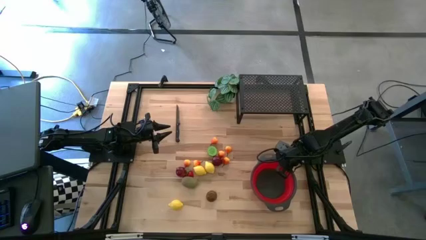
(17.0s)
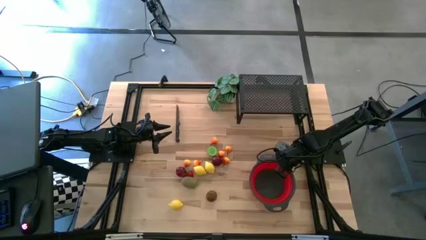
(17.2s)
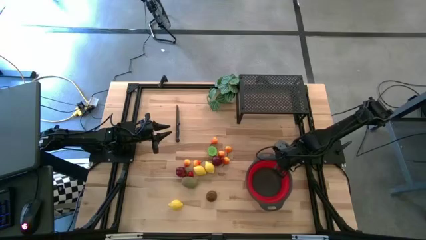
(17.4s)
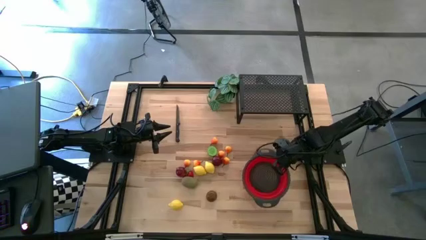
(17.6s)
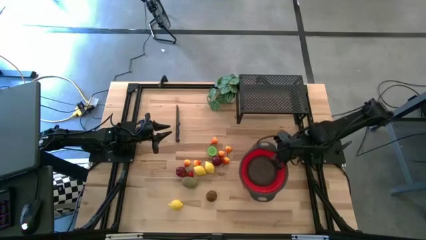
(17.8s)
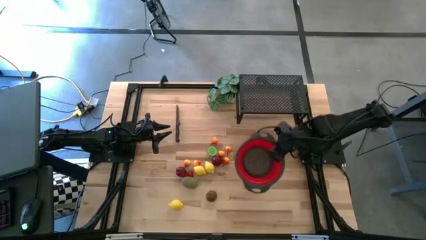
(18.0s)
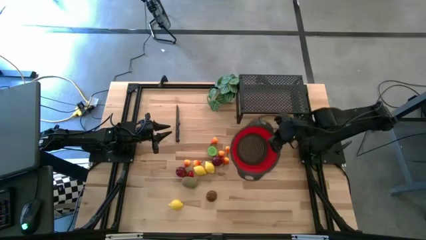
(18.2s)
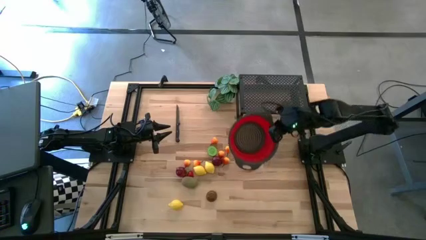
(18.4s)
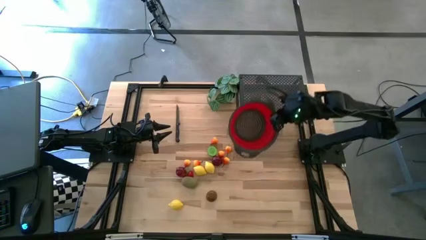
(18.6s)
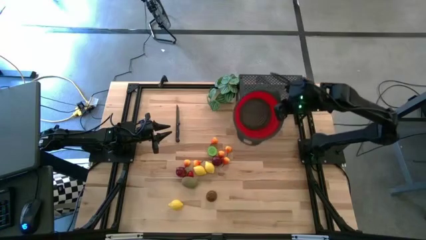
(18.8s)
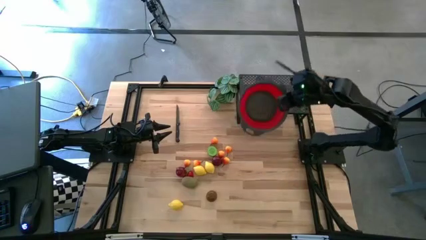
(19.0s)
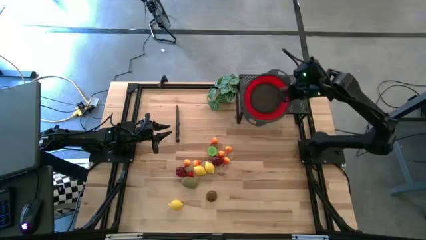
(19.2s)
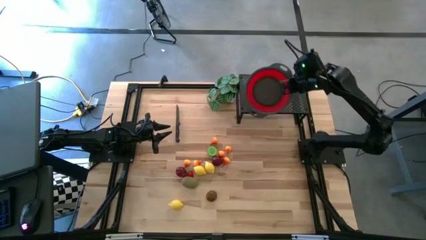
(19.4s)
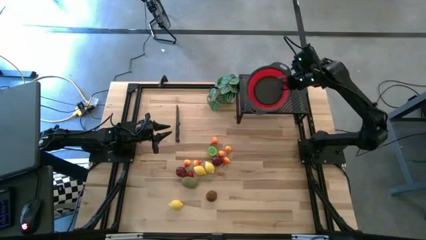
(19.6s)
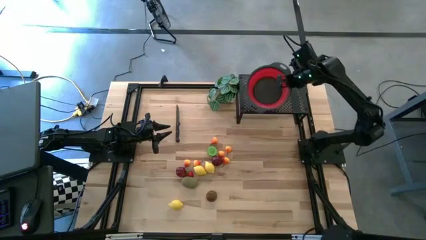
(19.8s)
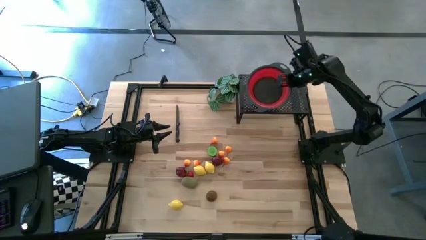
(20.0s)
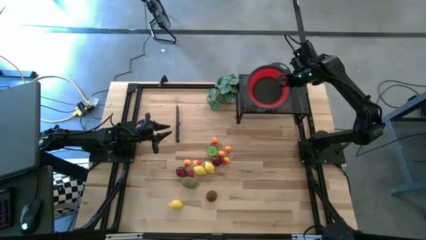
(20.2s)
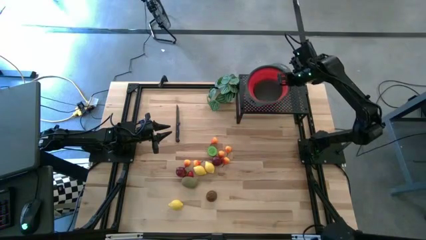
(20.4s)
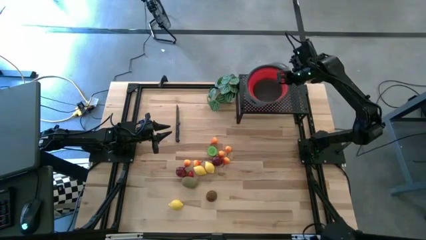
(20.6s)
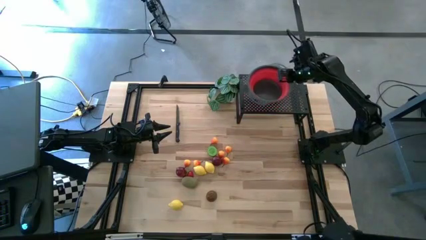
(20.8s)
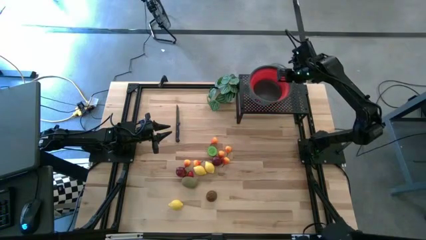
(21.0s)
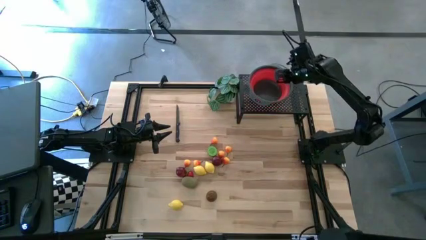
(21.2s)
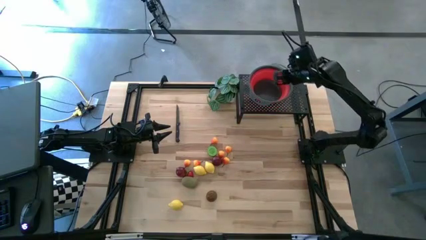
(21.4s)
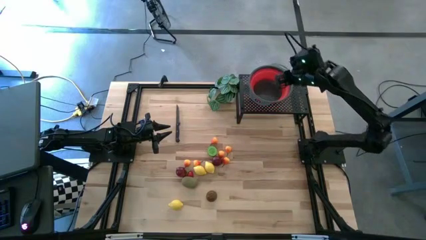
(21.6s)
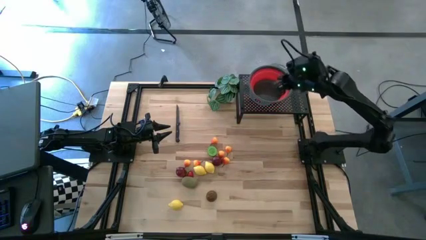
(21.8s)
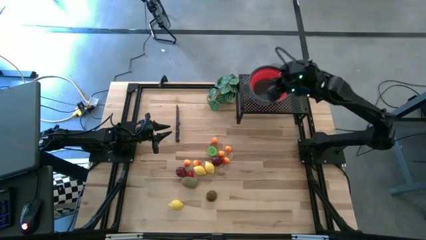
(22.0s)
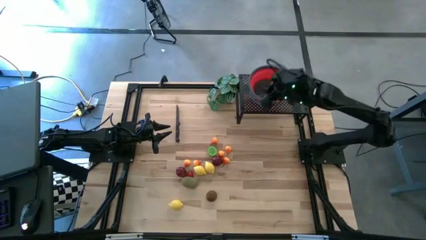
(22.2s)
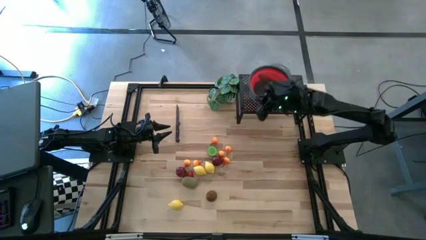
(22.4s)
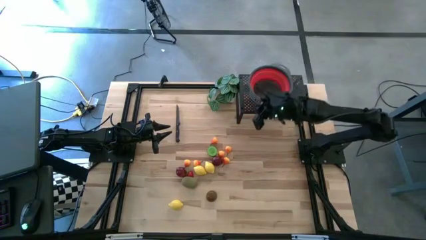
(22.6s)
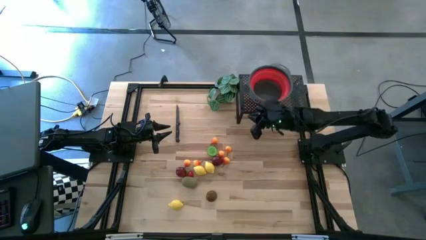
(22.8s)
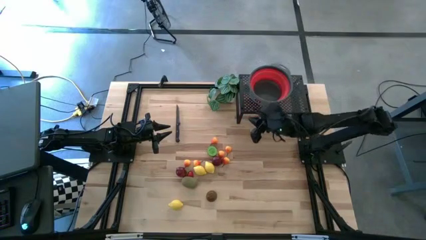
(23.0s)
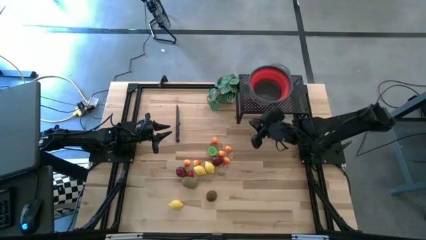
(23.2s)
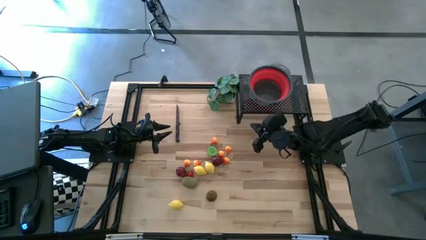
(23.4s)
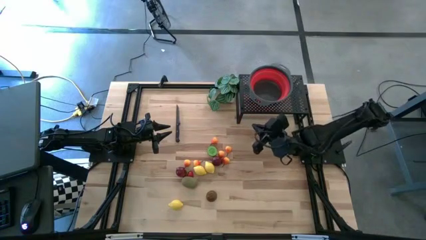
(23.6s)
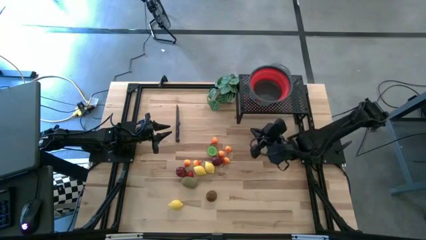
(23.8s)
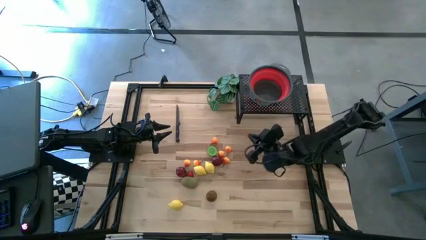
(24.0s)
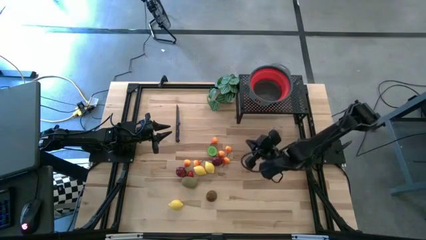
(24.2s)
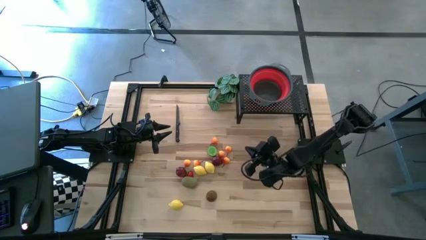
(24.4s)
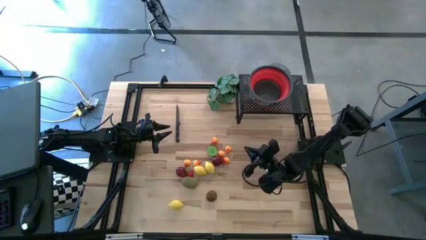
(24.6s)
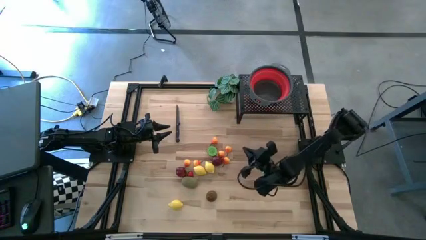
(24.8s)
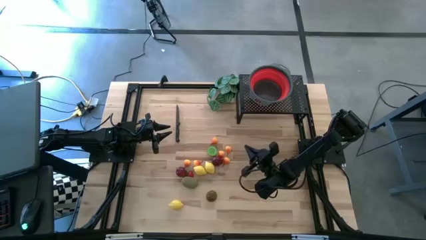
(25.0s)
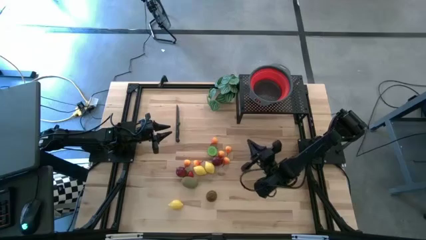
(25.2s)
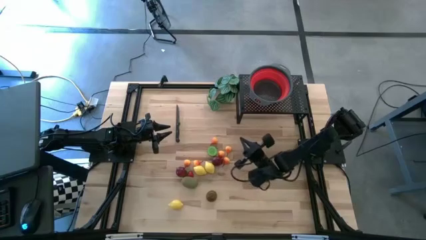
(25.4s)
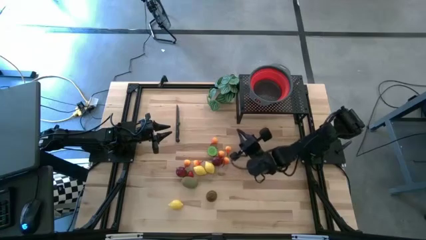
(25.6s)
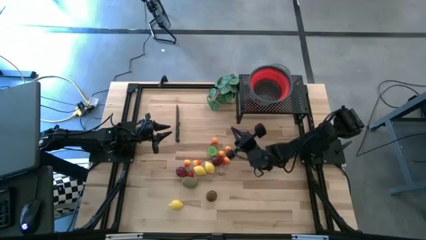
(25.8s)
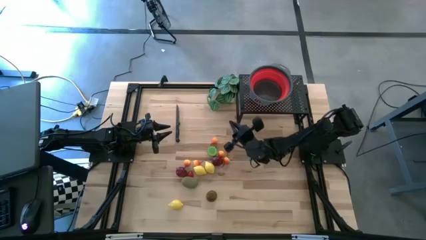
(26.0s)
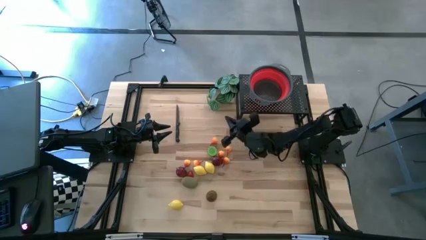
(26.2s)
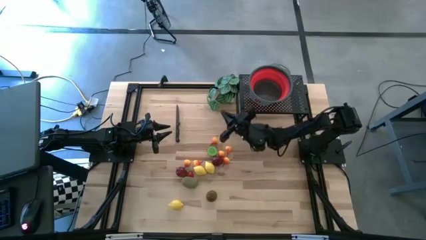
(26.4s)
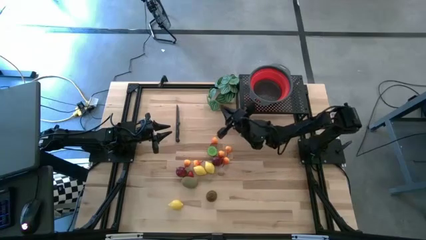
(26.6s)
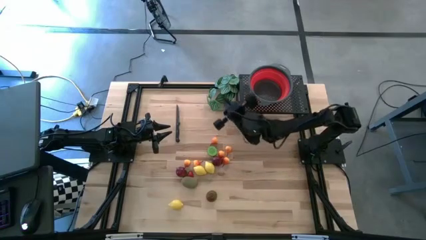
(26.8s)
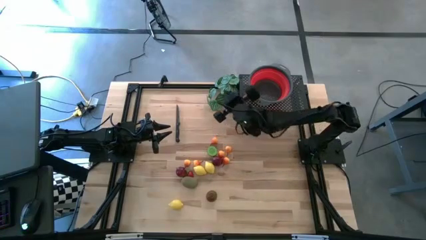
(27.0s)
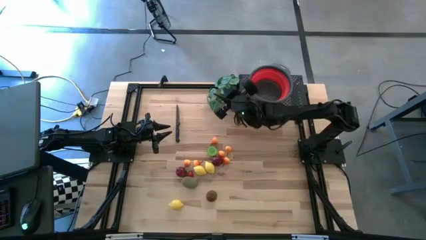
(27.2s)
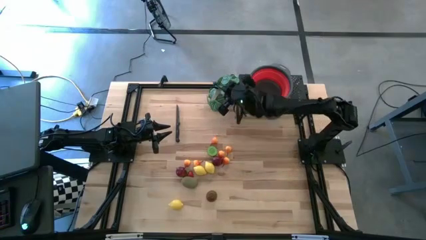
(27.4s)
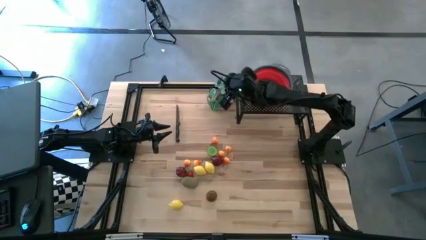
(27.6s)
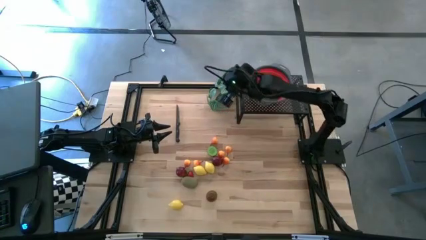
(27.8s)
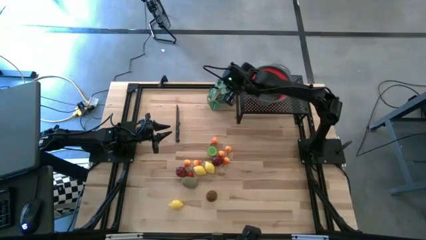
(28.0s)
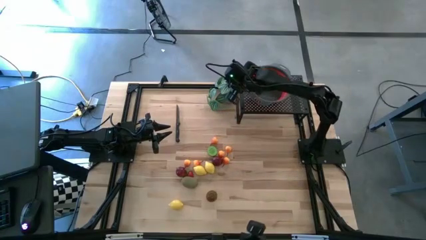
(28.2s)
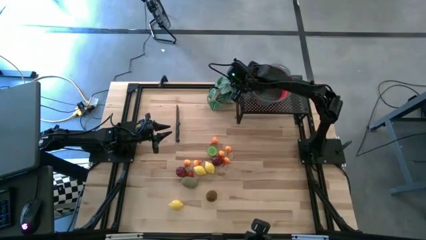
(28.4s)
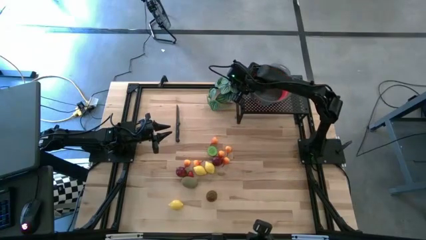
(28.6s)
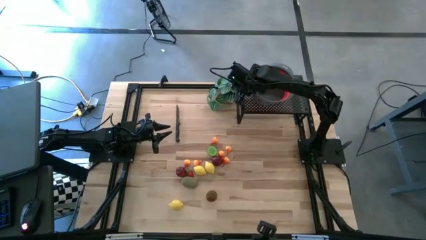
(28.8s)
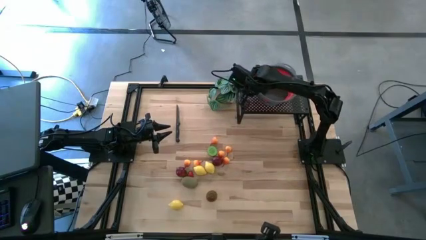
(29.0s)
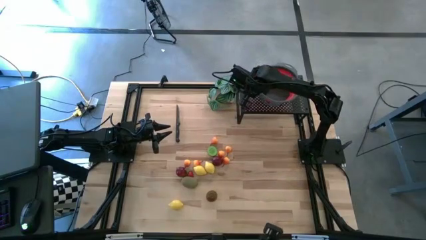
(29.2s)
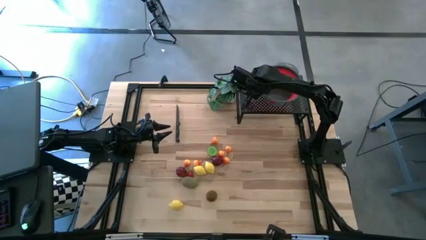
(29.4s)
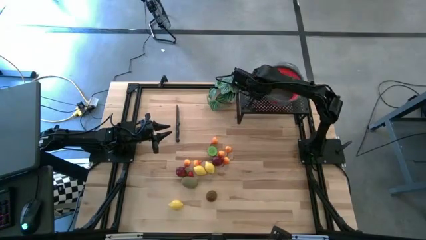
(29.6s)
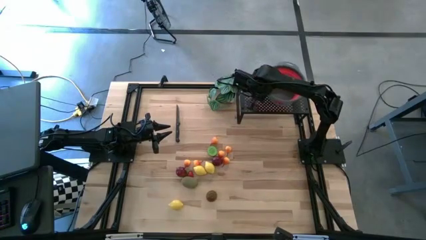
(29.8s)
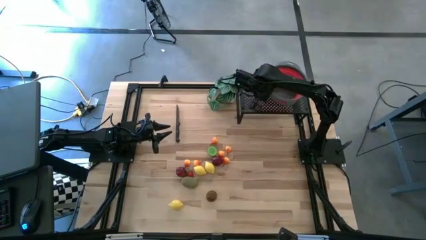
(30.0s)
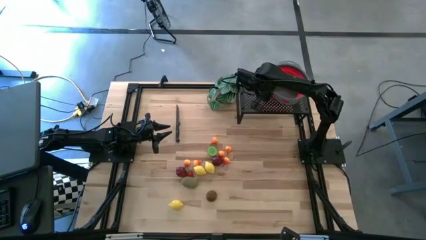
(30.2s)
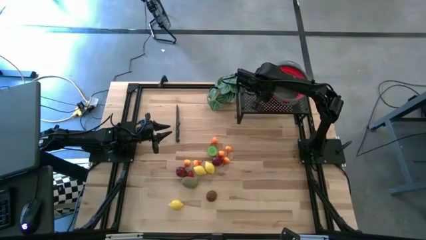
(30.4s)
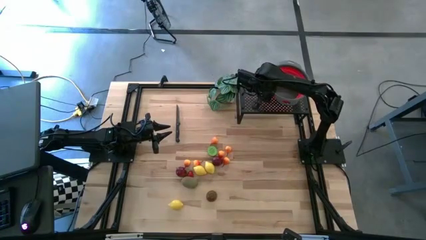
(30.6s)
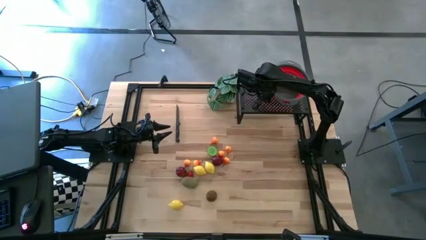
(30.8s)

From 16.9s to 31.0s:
Task: Pick & Place Fruit
Put the red strainer bowl on the shelf
